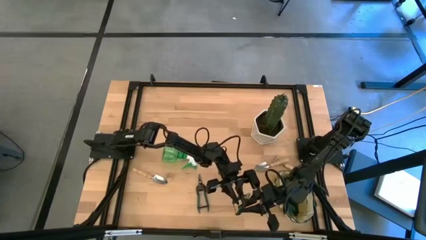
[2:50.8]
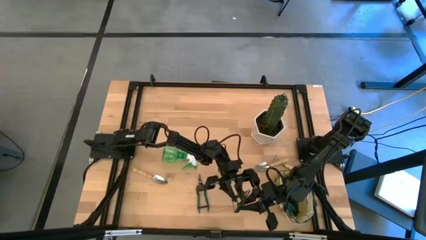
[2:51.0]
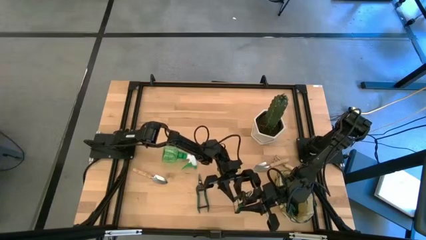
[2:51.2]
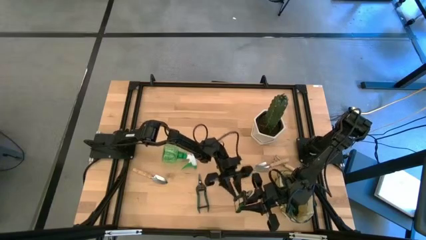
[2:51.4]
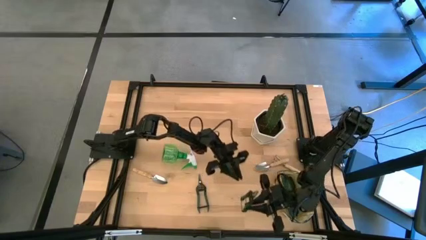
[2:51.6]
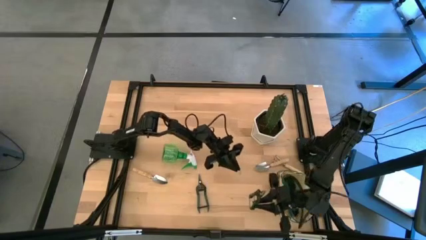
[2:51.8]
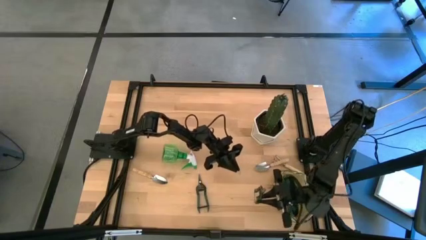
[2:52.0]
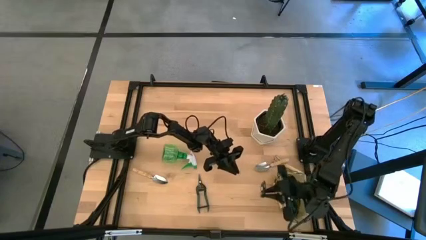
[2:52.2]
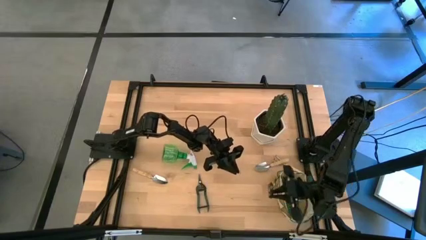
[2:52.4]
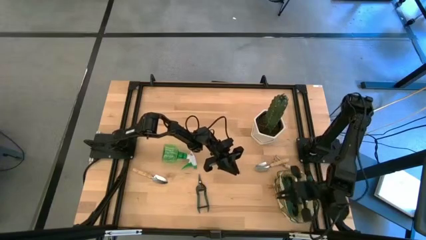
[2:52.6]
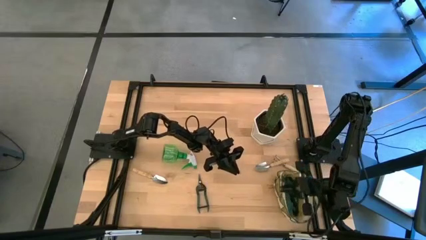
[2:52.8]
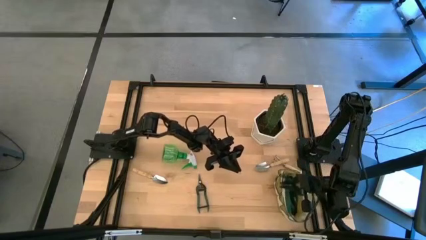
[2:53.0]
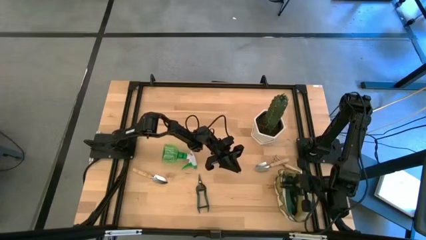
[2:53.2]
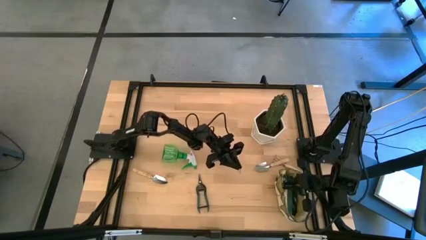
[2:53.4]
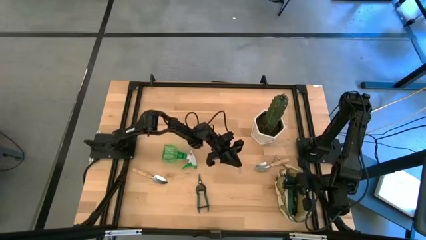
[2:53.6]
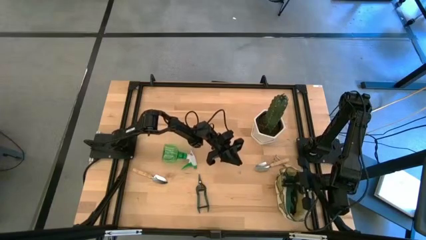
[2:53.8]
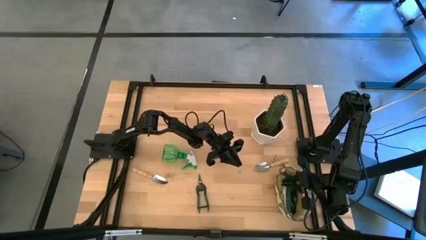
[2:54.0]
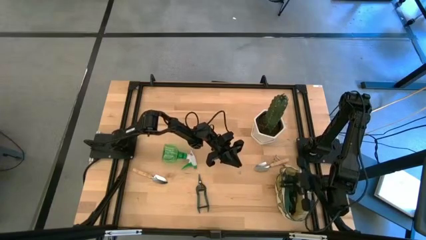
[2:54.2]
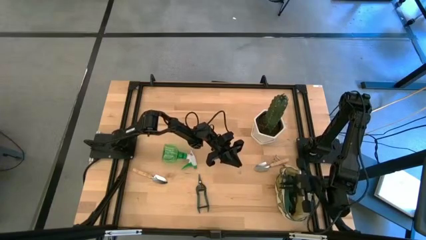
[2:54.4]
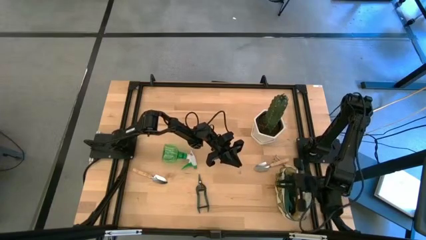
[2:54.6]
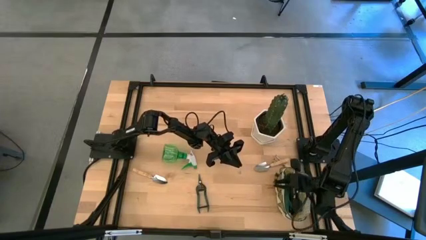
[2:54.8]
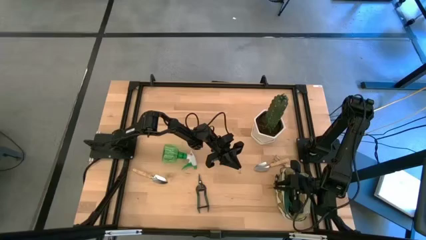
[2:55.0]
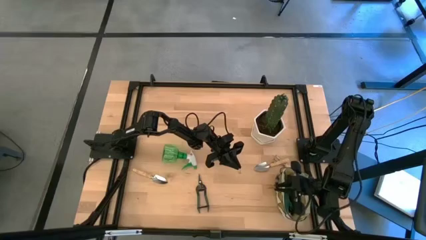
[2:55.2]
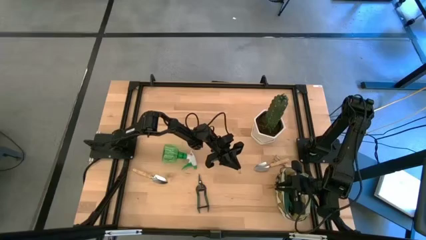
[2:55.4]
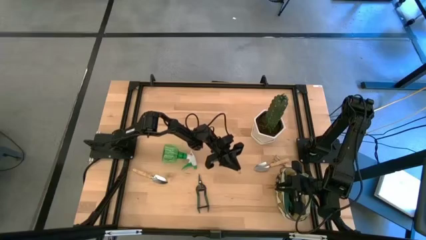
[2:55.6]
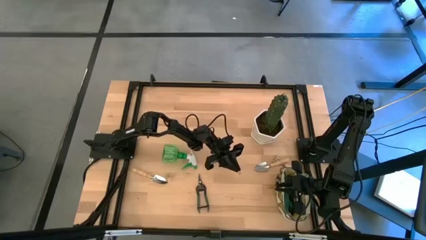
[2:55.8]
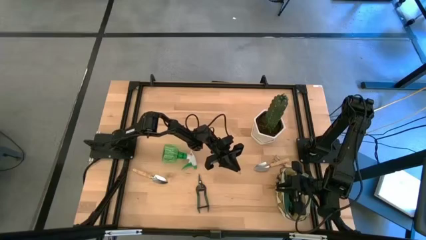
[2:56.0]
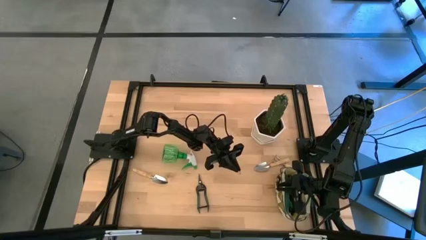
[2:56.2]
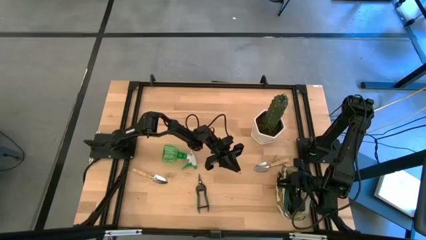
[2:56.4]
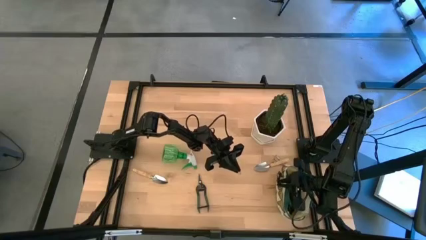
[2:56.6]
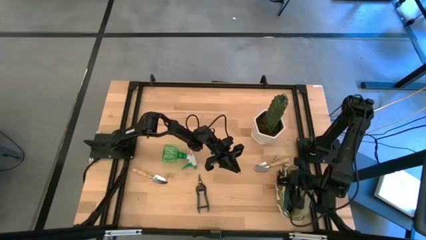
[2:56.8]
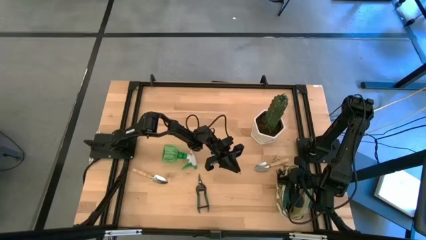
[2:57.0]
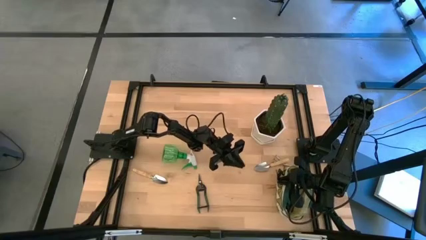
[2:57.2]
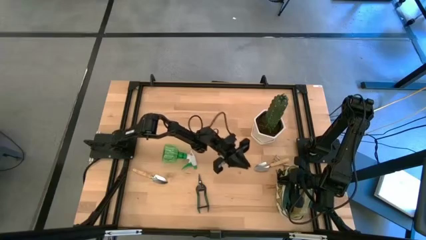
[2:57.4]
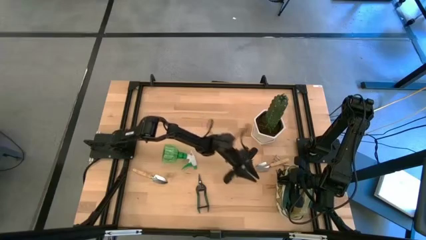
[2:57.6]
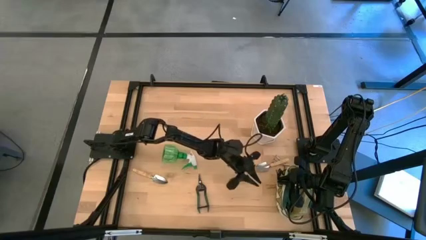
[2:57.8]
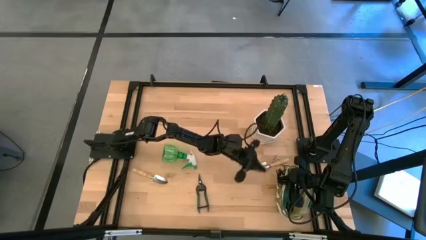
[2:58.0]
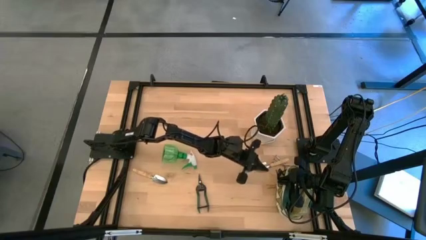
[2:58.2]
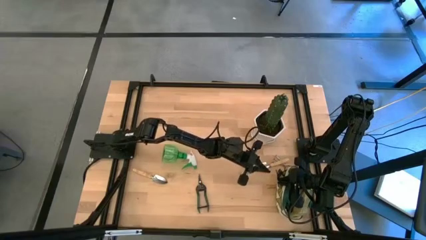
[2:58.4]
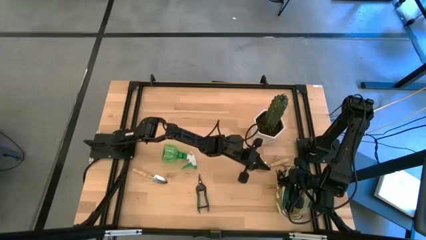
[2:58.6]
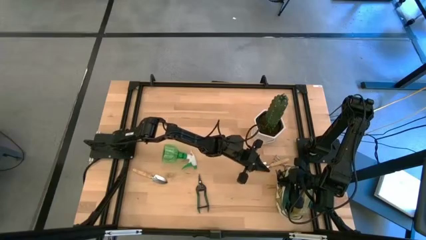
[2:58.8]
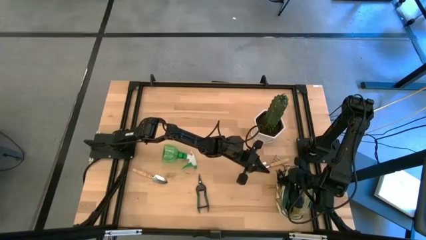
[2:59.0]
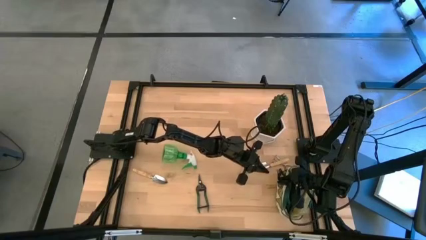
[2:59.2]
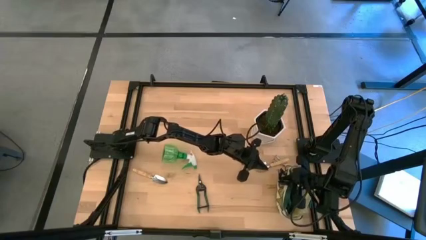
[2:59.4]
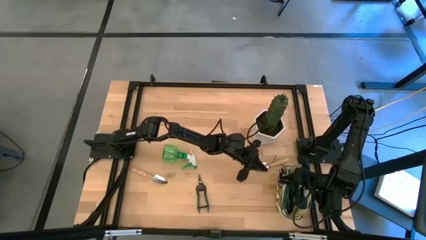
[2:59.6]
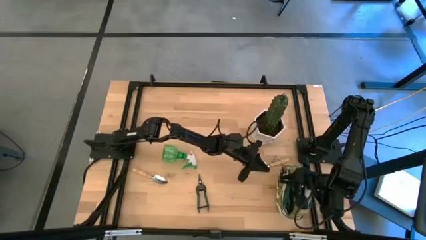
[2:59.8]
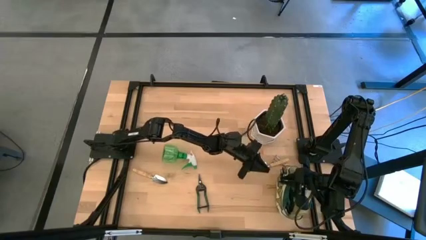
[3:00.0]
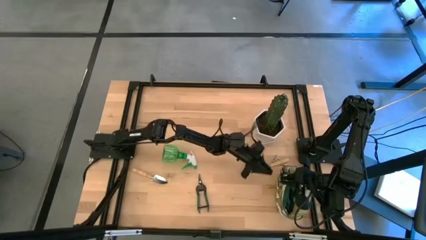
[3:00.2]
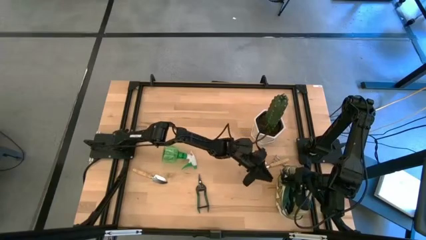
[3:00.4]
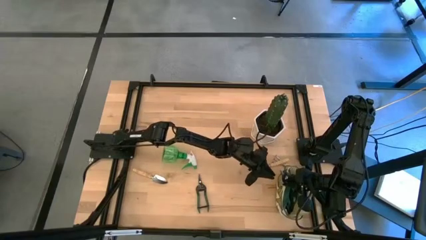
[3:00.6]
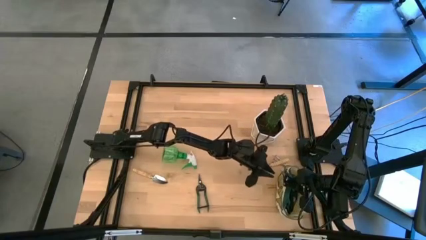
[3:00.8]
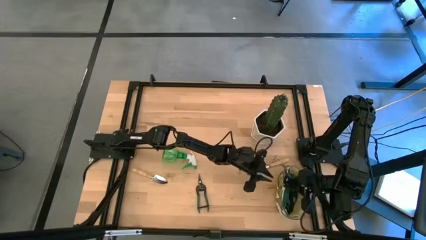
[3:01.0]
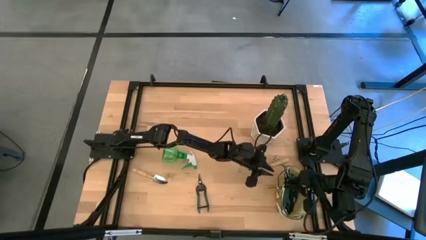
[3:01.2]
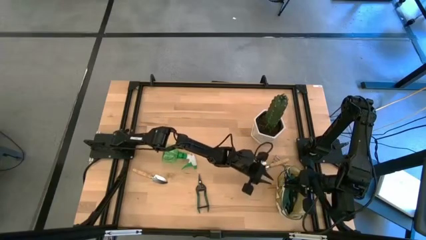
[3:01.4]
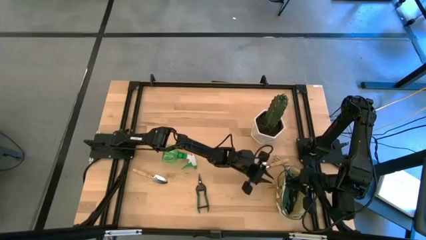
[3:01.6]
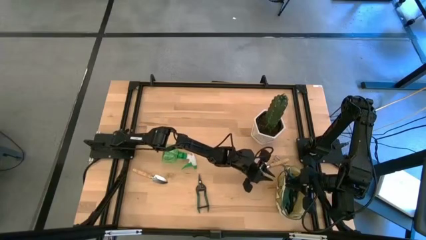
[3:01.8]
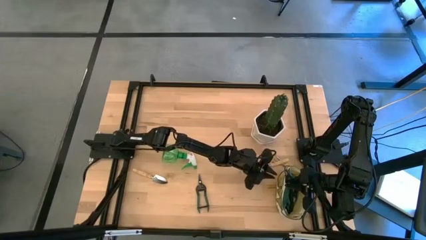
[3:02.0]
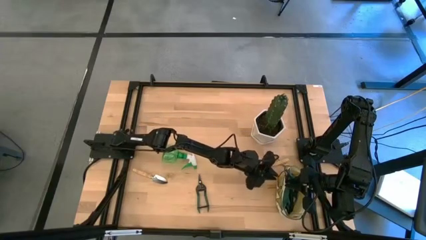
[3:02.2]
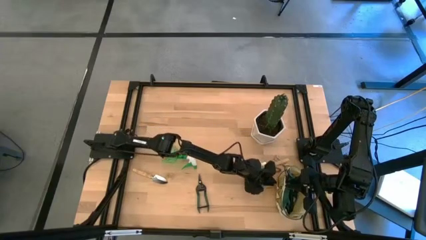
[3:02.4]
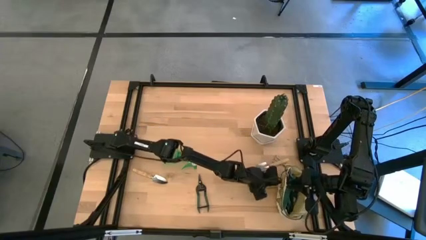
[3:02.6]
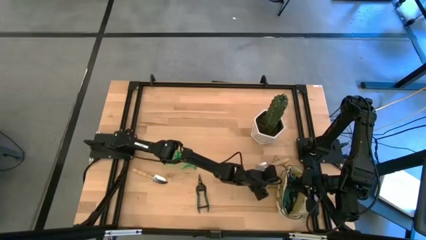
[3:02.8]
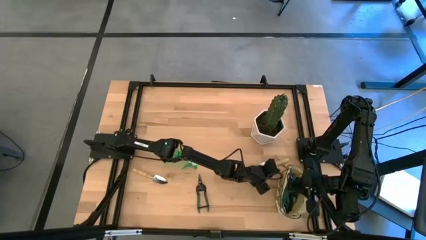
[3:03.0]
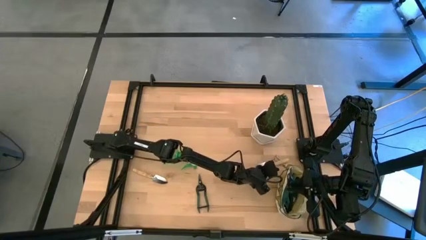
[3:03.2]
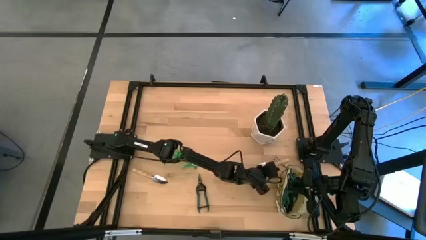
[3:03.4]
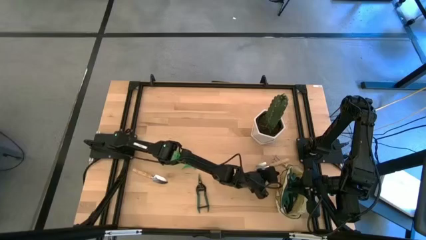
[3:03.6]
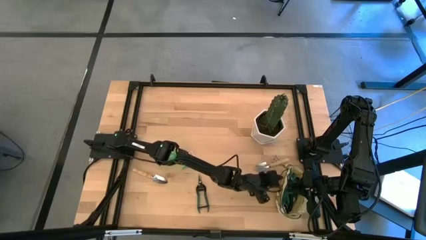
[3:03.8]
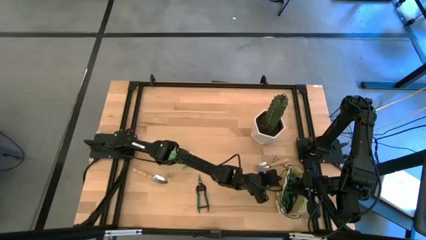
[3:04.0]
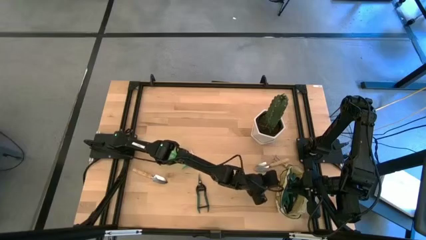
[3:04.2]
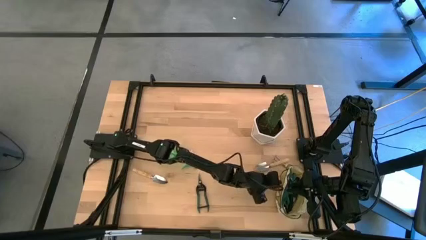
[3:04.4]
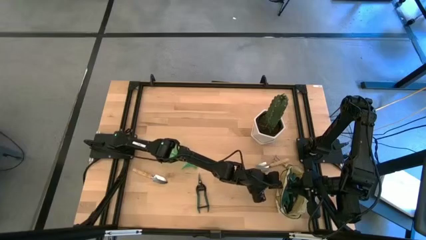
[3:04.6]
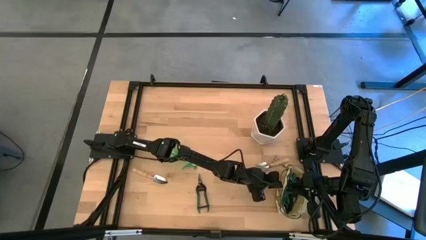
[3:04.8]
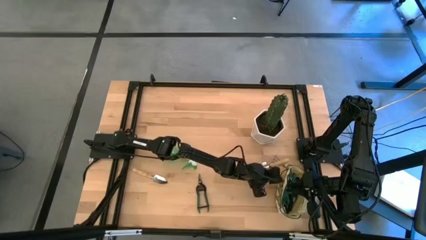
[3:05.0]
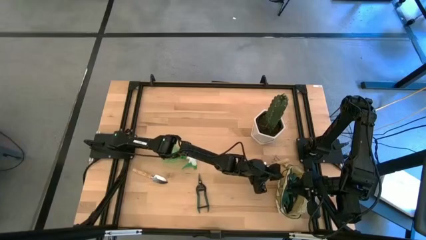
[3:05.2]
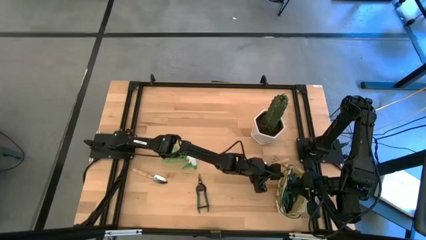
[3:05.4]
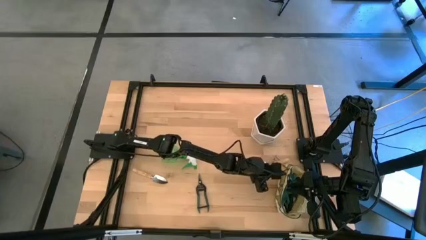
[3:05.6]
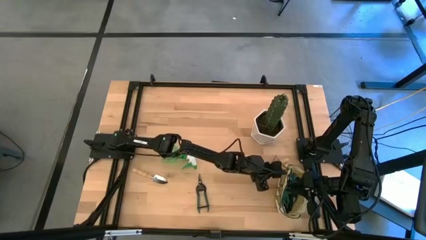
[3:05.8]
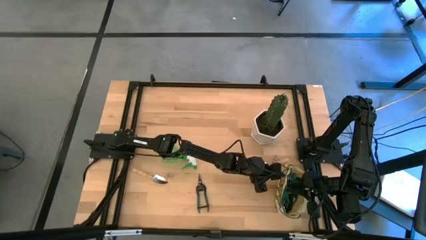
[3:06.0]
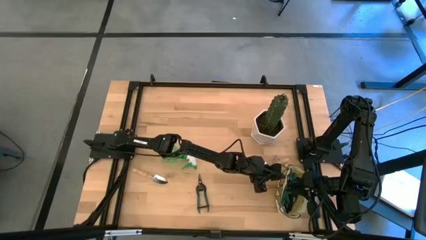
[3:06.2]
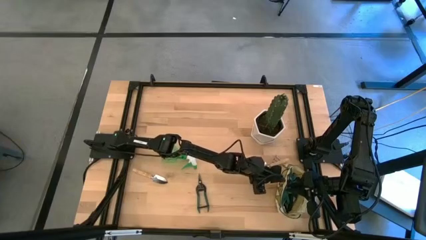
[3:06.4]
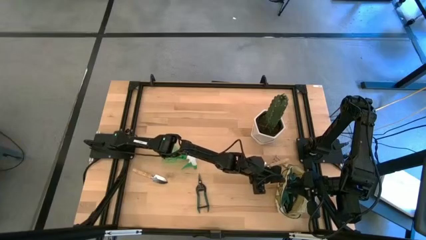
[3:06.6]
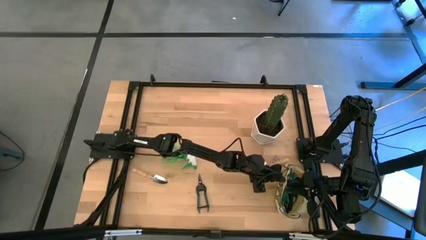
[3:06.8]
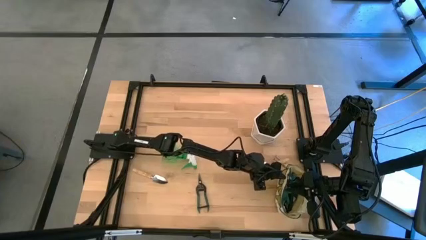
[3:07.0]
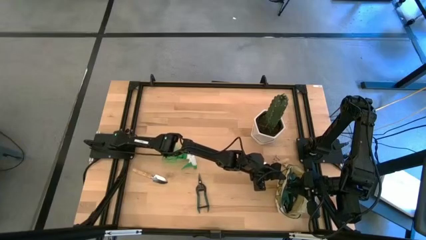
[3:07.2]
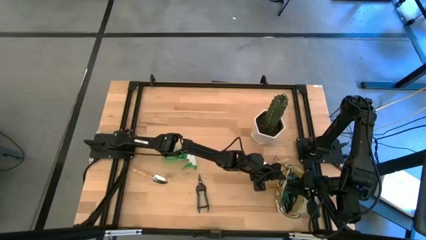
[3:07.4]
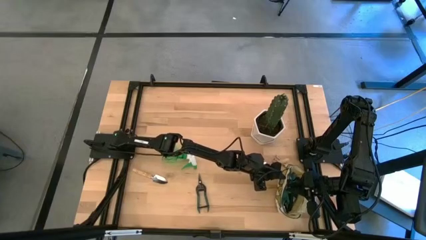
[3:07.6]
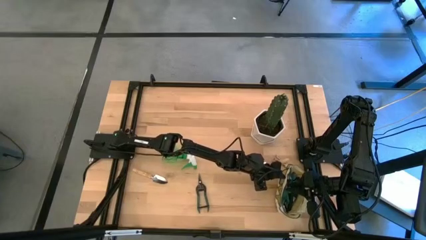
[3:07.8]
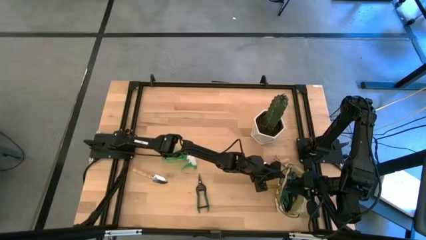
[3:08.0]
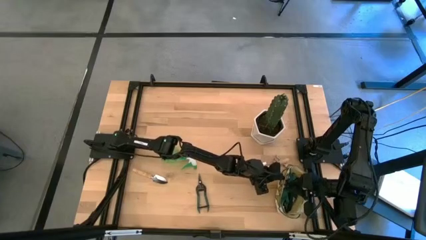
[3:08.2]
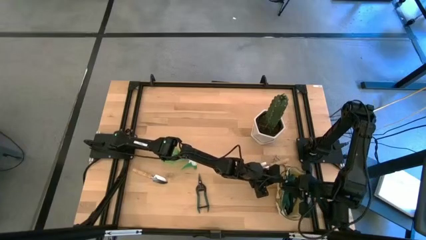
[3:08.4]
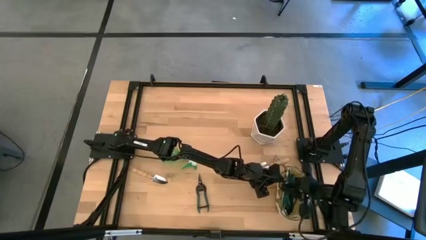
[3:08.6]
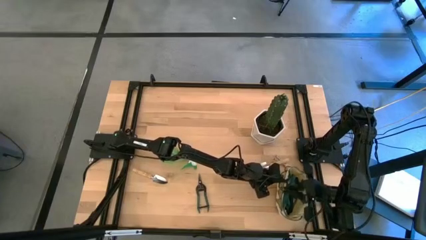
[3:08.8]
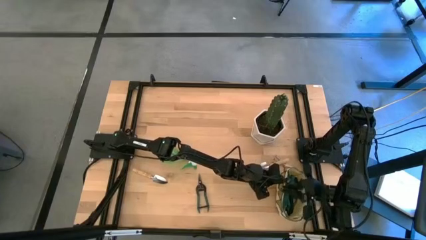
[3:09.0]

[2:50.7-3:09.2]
Task: Pick & Place Garden tools in Gardening bag
Put the top grafting pruner into the side pocket of the white bag
